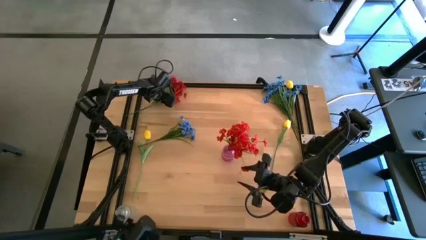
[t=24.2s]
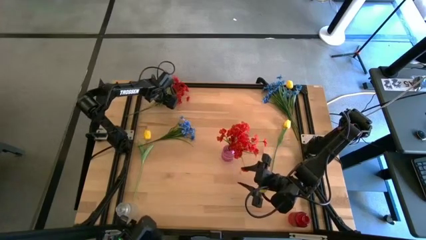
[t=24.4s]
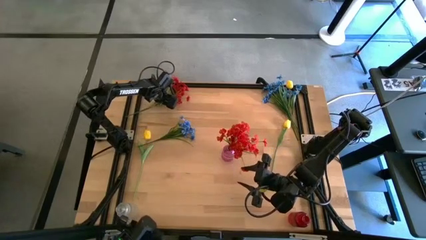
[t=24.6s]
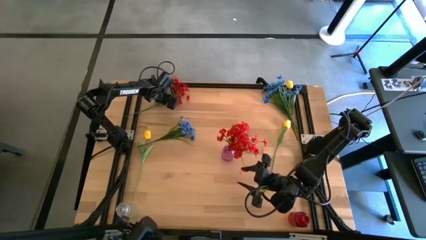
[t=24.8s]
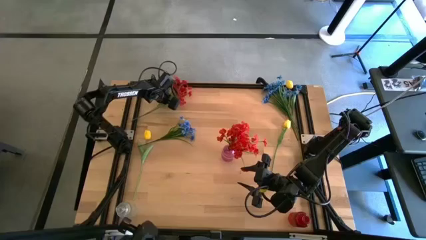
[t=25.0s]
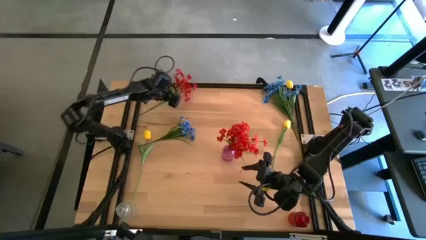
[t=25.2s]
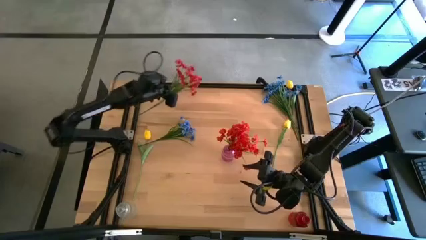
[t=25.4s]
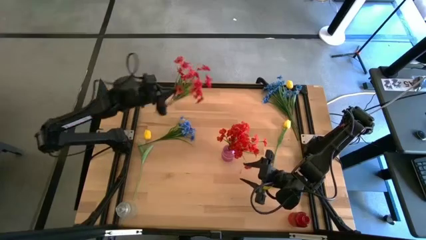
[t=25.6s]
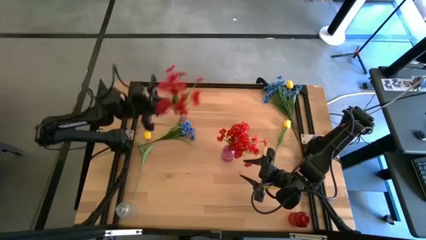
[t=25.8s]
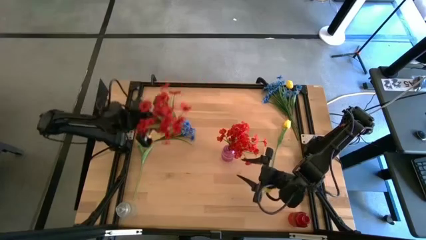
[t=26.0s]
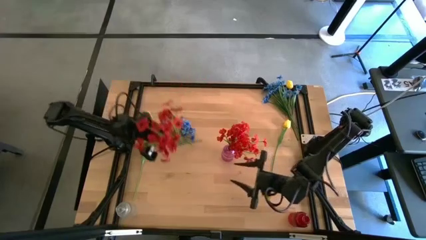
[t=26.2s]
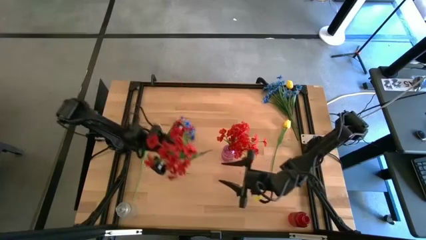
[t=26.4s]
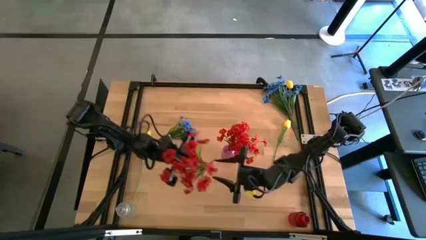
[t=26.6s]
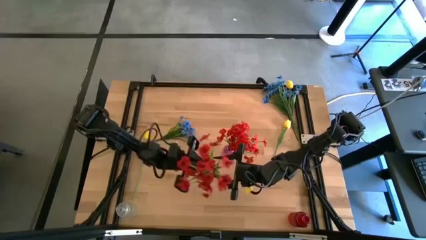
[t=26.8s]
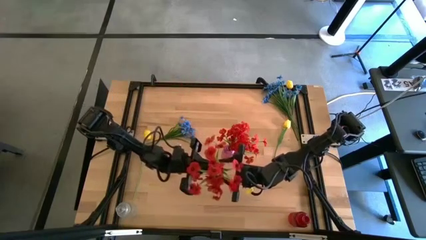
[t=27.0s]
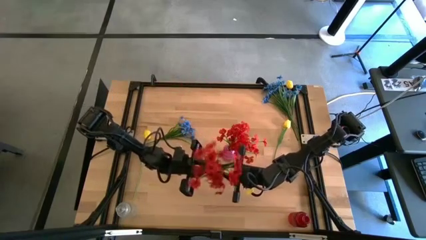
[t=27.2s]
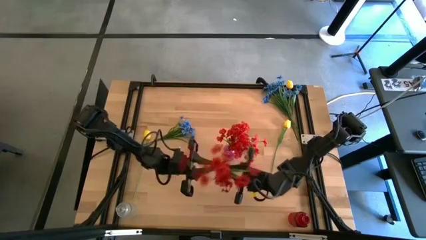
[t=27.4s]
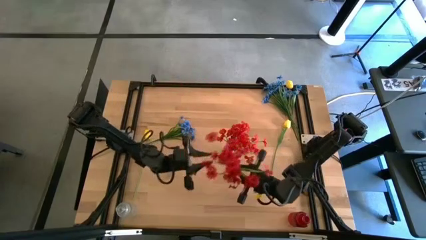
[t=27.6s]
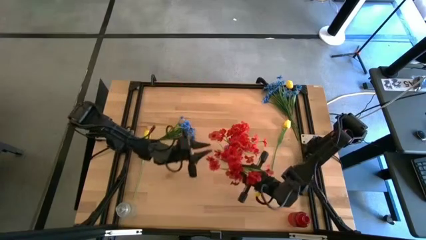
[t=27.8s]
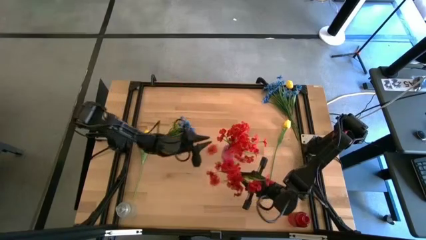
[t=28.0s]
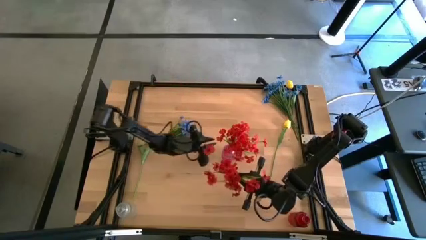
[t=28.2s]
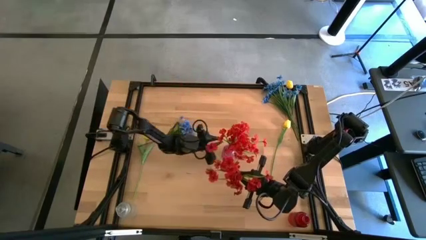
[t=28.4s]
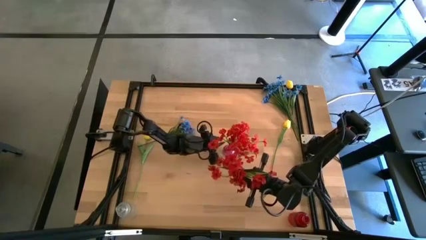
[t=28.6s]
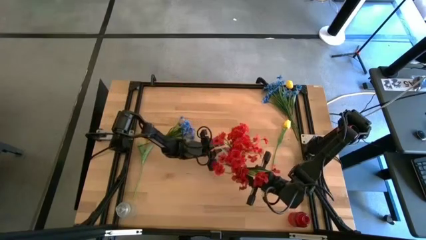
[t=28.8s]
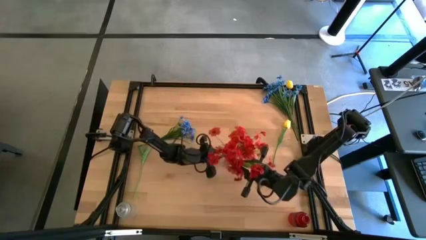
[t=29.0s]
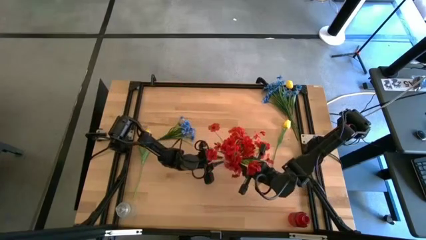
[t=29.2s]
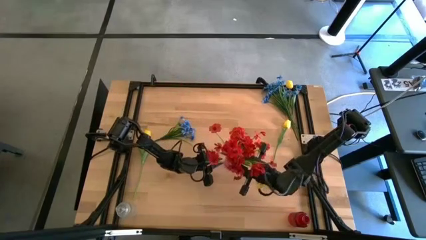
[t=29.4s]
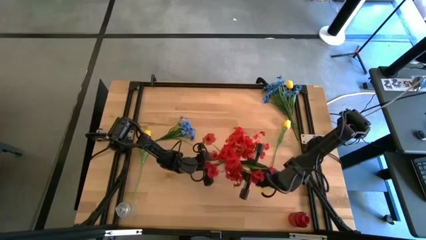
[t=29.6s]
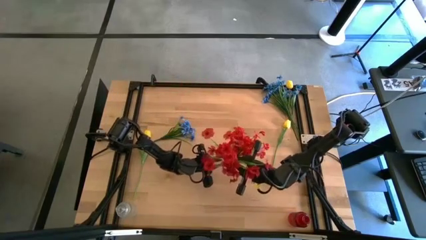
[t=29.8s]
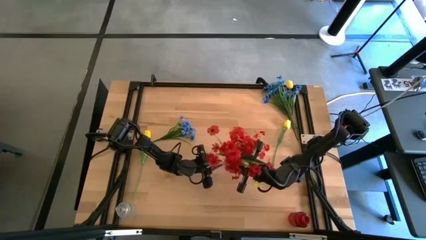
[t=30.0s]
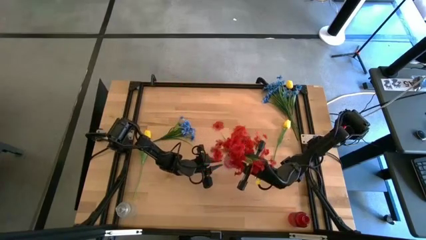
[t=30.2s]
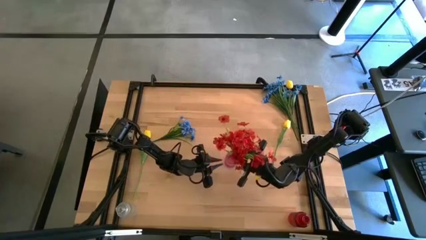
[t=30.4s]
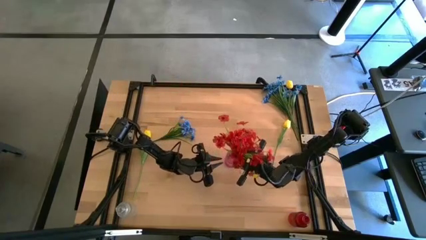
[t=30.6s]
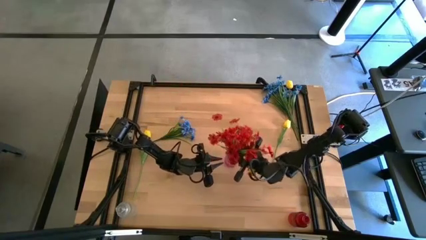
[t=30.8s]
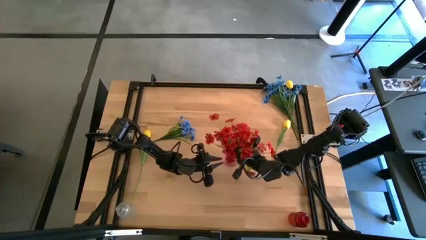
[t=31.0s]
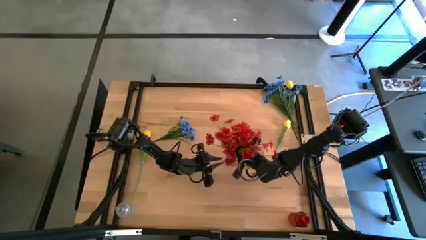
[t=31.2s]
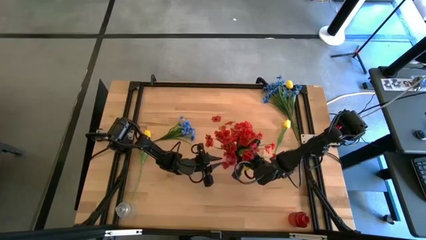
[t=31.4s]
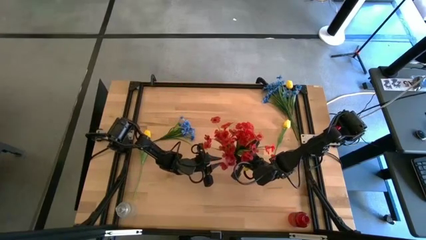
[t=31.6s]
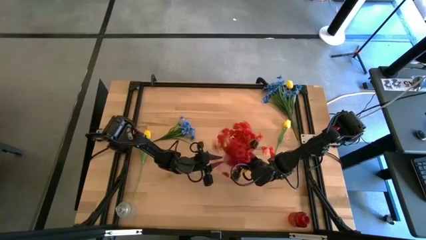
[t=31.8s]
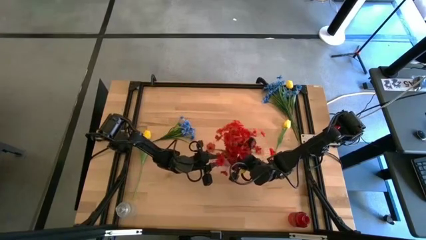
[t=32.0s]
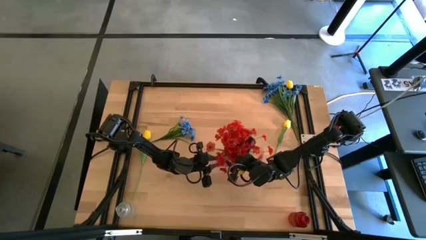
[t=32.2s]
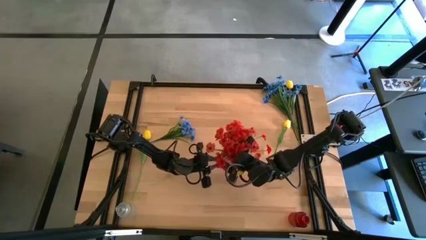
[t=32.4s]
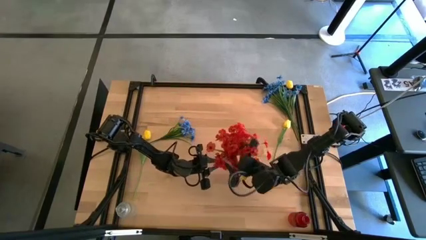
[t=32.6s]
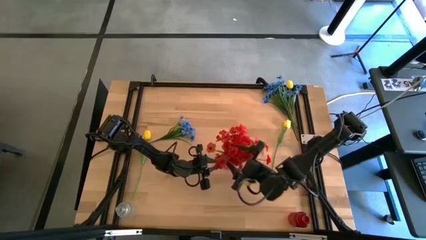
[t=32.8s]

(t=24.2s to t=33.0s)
Task: Sort flowers into vase by color
Put the red flowers into the violet vase

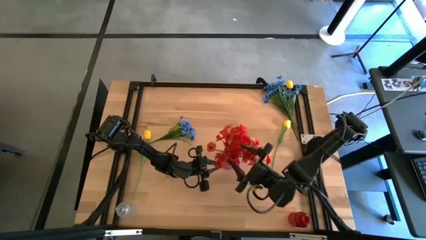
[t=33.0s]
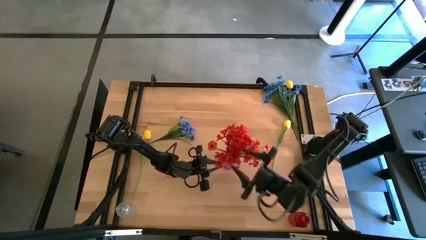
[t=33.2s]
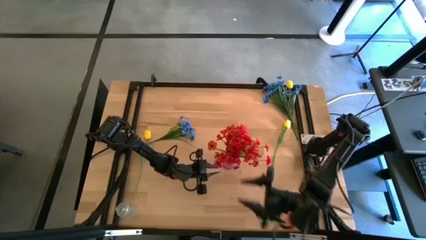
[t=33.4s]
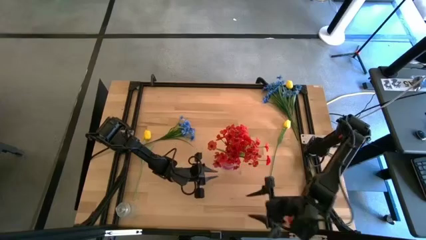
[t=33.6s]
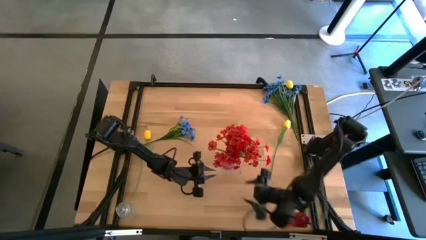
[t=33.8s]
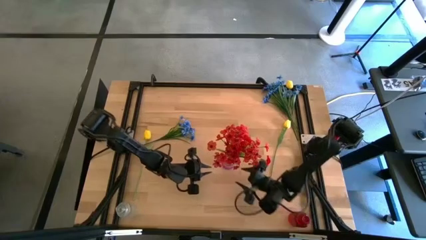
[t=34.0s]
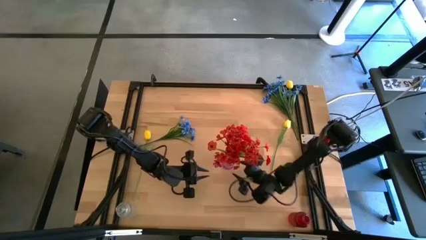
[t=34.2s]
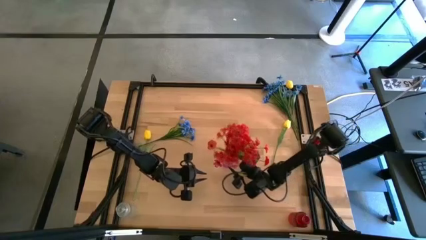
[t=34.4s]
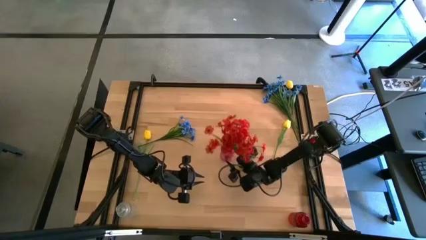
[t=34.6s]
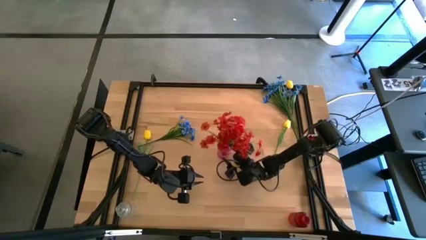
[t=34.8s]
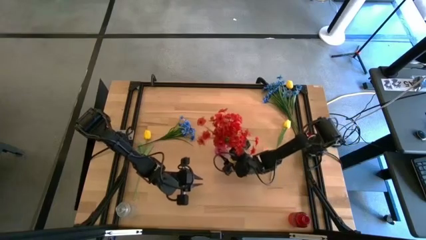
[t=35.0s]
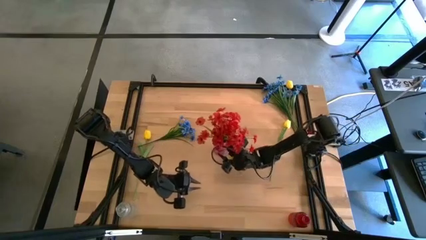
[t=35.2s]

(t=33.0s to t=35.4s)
Adjust the violet vase

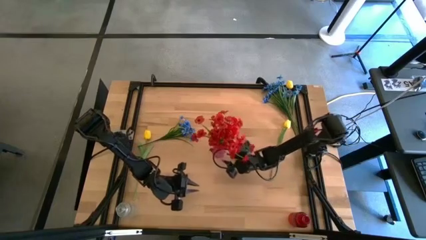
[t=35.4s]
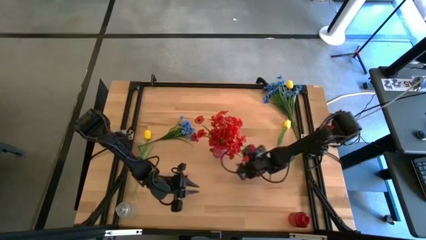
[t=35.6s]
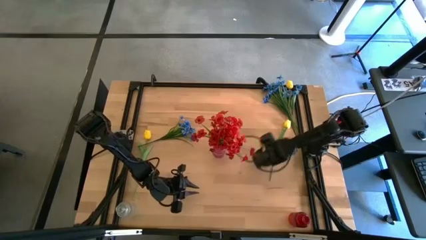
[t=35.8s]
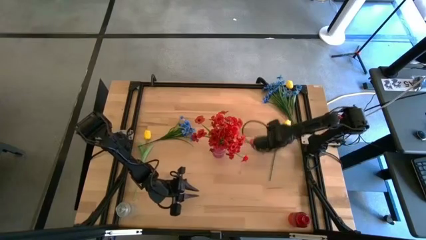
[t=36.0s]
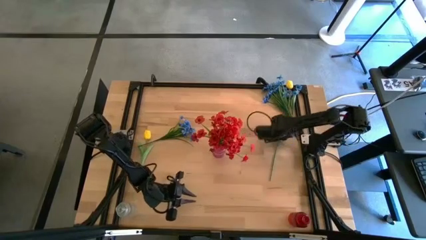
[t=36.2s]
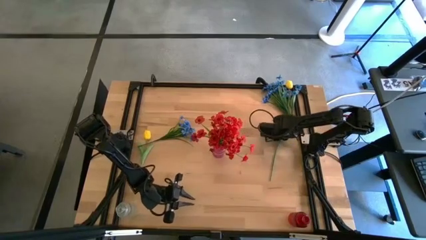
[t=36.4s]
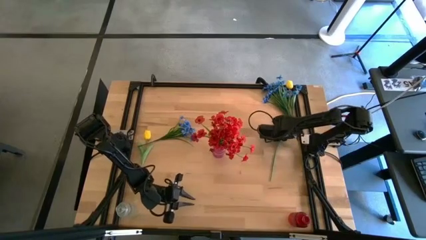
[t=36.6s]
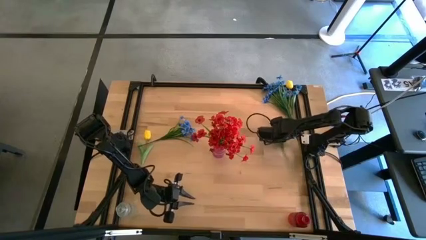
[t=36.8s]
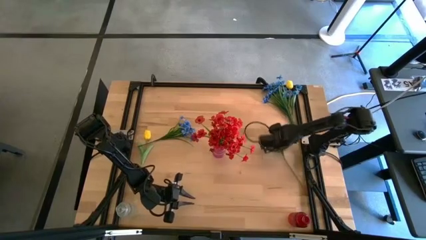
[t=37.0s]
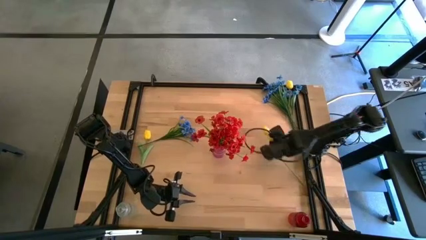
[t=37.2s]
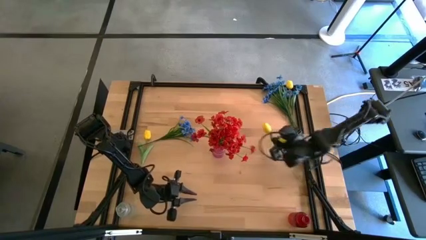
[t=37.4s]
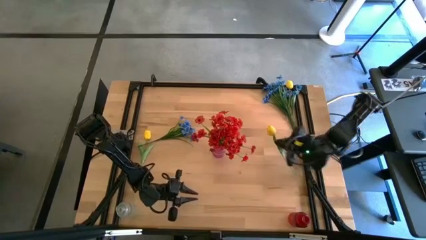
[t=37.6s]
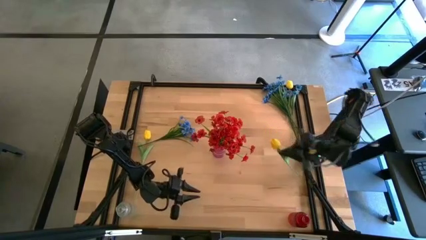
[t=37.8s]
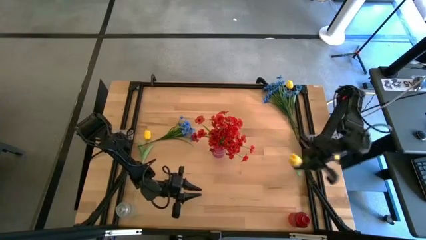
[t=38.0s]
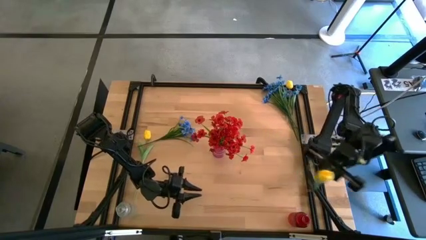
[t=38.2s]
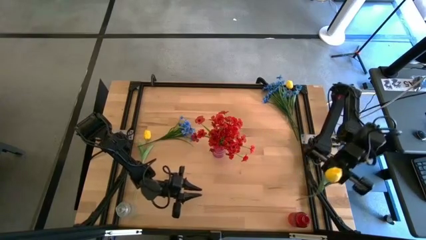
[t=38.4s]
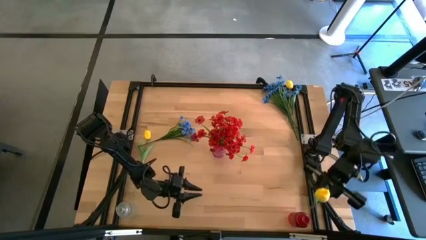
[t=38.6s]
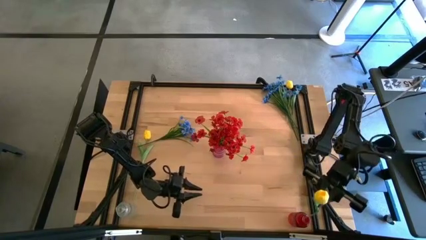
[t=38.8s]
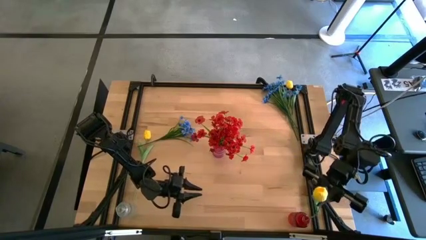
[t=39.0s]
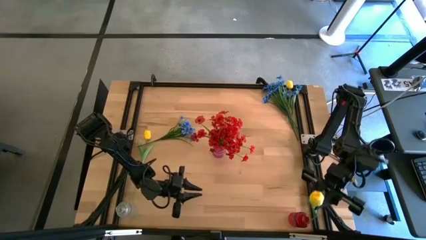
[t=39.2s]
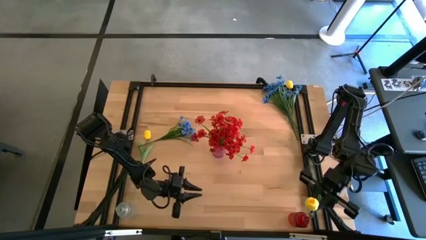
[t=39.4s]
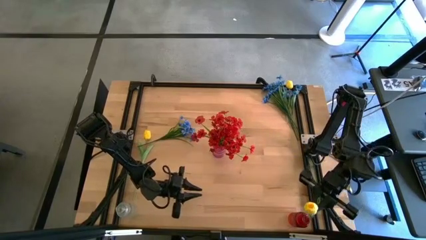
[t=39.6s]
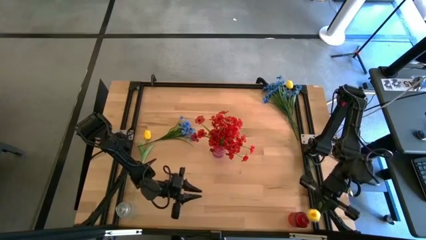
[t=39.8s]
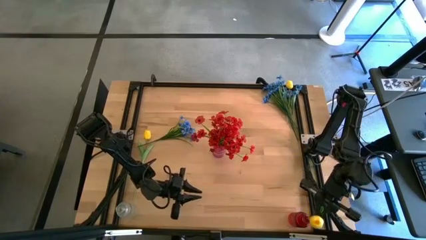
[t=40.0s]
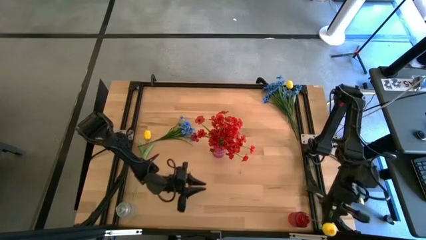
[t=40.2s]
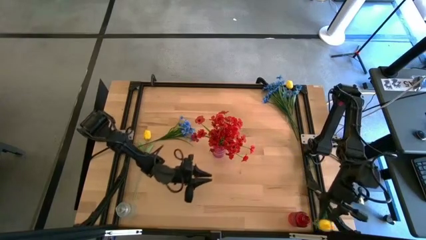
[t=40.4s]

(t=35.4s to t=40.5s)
Put the bottom right yellow tulip into the red vase
